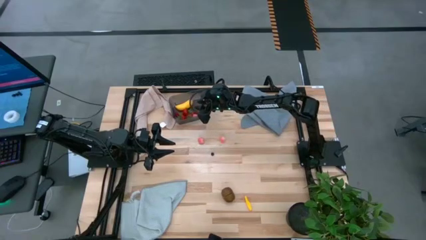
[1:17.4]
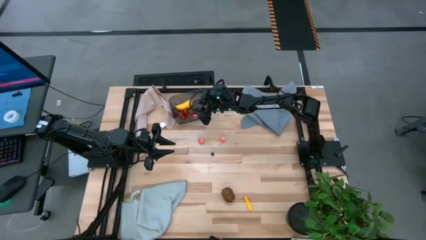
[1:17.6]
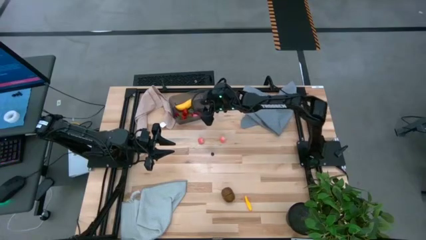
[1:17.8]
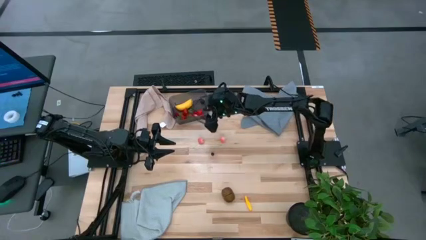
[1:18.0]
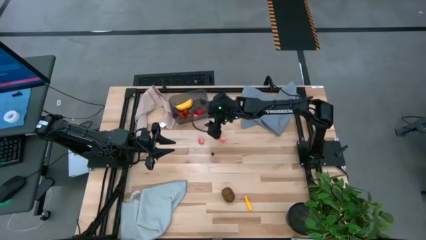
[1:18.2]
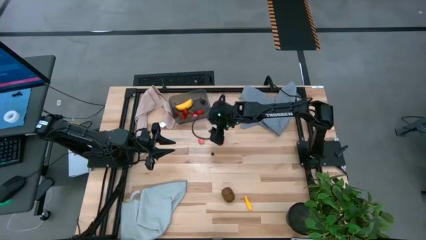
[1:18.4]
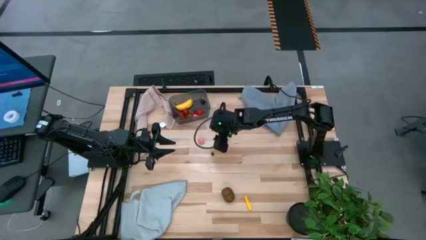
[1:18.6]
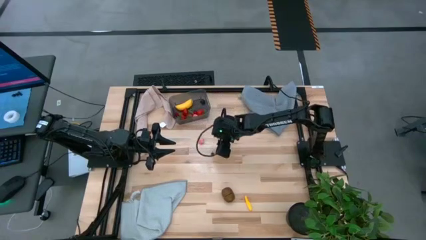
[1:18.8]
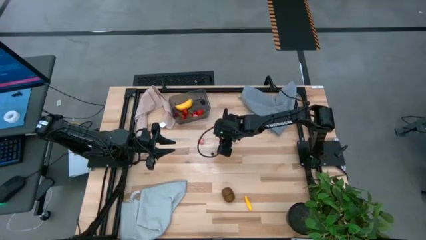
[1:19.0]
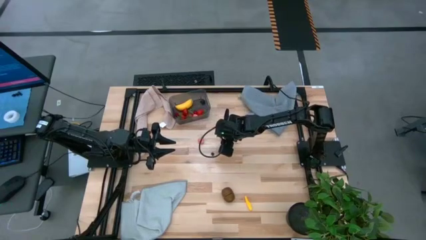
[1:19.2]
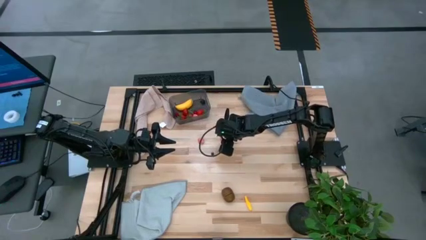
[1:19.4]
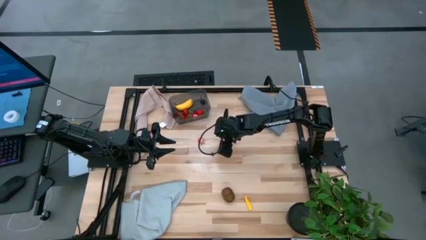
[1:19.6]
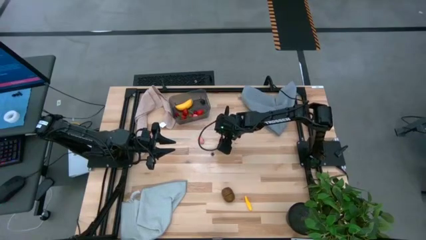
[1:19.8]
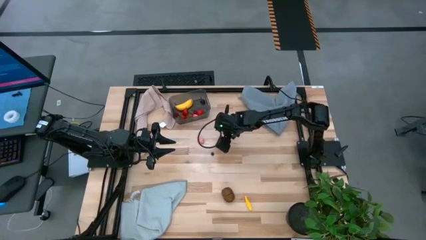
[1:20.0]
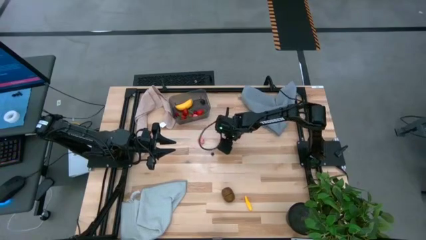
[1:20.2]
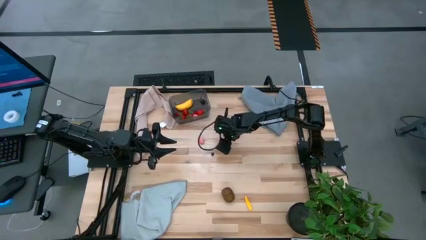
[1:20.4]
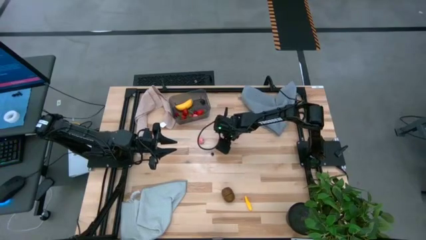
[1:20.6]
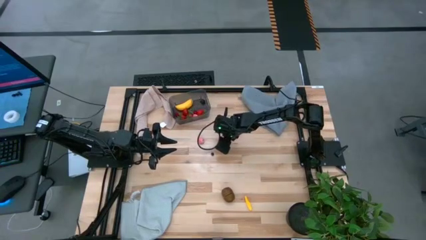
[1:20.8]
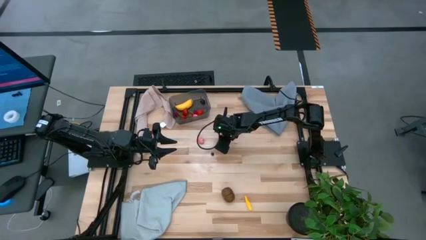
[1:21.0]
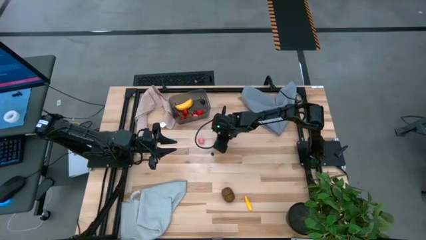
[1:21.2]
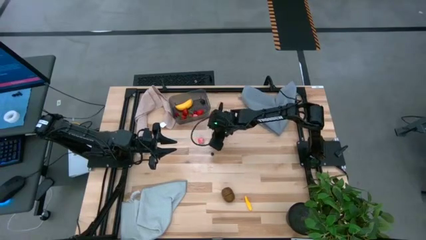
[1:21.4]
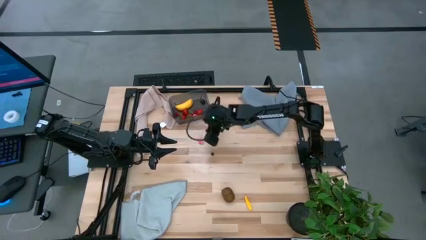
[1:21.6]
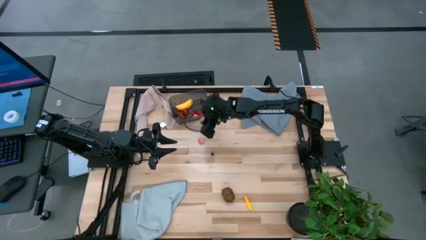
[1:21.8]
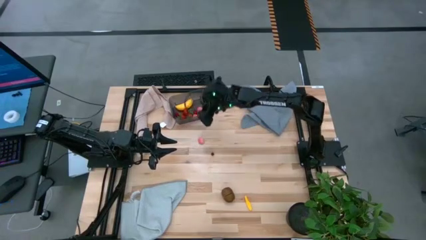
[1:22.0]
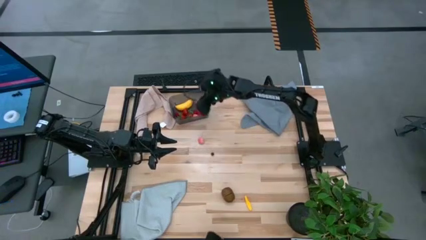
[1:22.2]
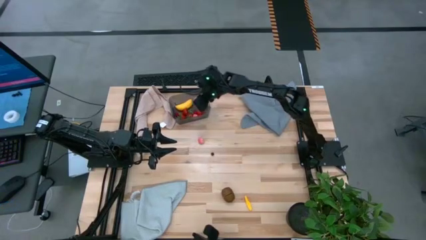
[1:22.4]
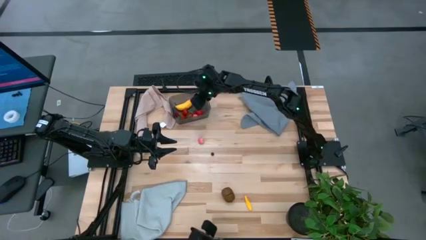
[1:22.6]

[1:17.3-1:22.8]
Task: Pick and placing Produce into tupperware
Put the pink peach into the black bin

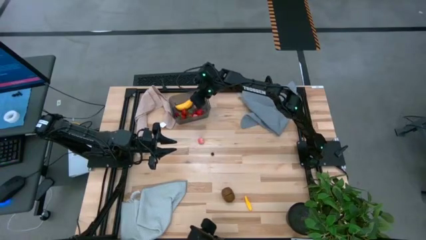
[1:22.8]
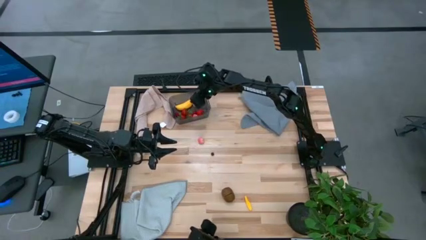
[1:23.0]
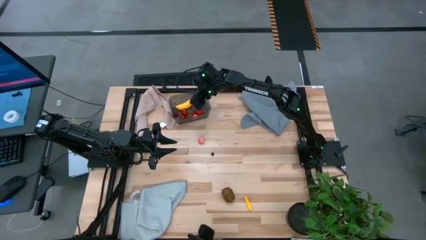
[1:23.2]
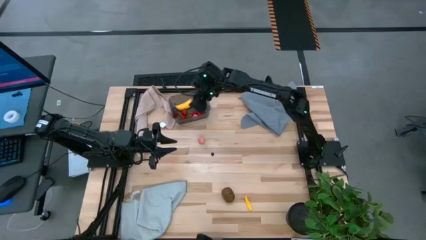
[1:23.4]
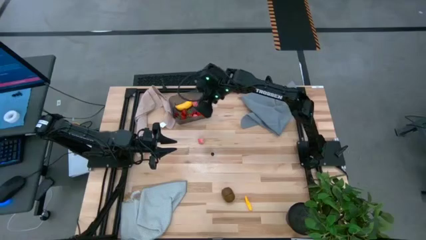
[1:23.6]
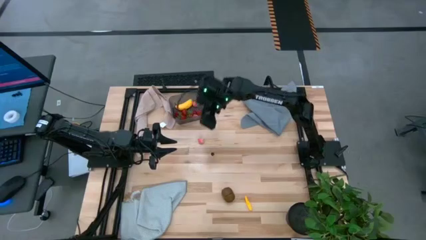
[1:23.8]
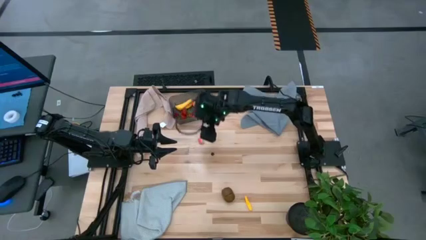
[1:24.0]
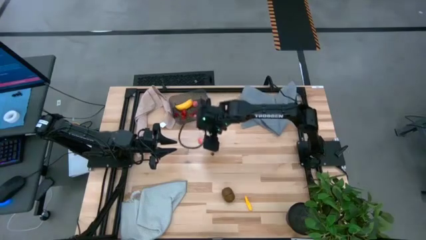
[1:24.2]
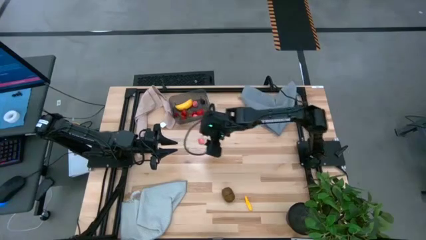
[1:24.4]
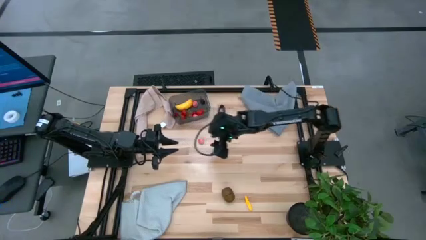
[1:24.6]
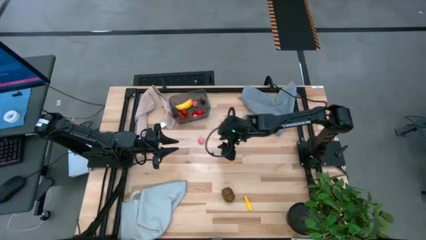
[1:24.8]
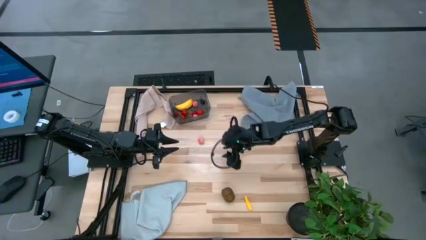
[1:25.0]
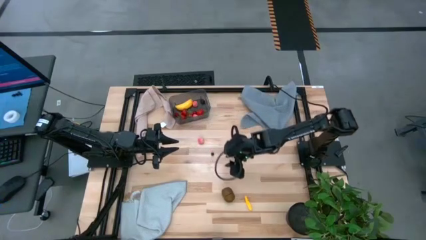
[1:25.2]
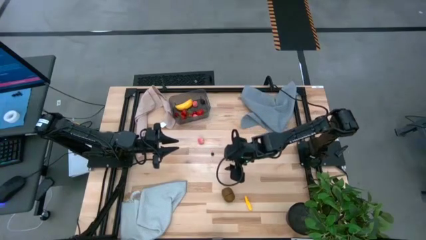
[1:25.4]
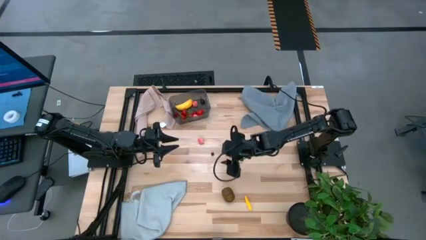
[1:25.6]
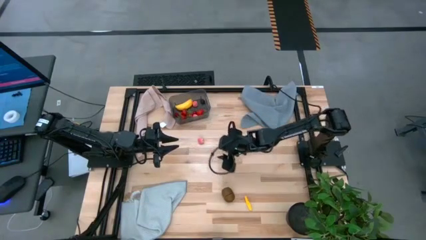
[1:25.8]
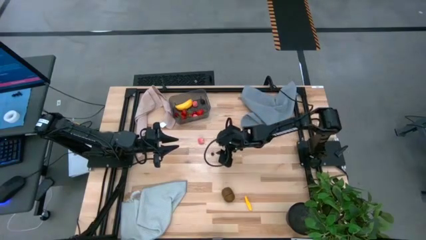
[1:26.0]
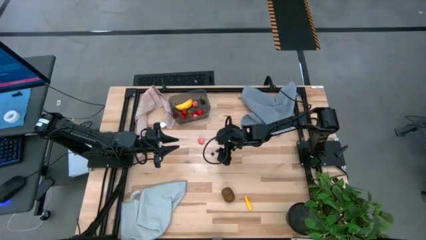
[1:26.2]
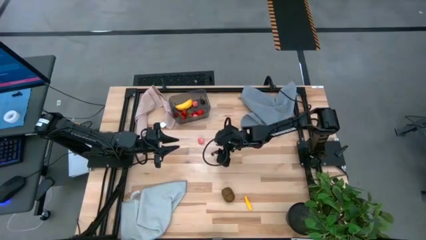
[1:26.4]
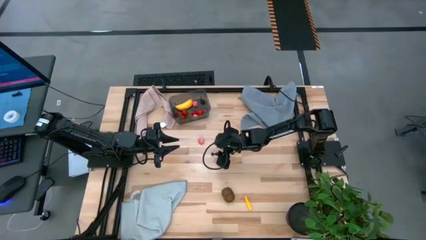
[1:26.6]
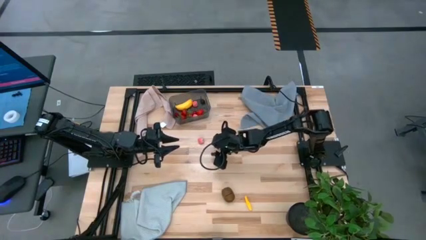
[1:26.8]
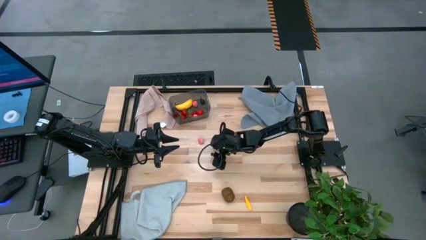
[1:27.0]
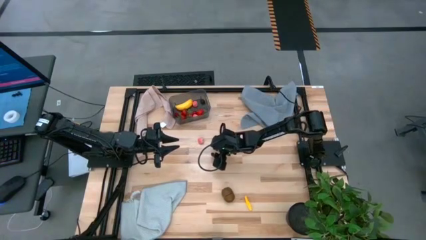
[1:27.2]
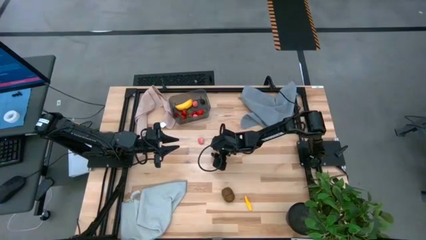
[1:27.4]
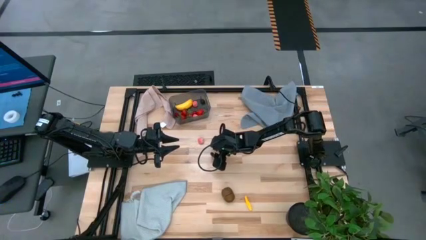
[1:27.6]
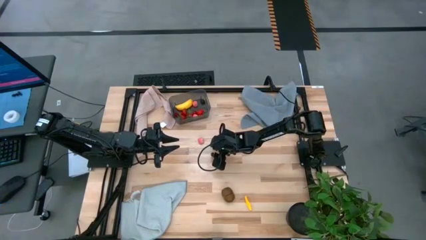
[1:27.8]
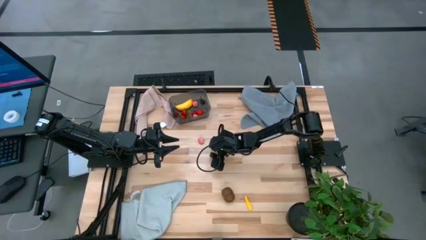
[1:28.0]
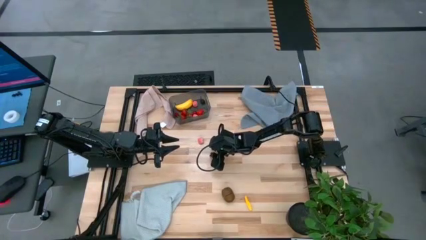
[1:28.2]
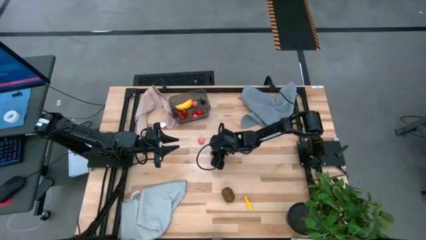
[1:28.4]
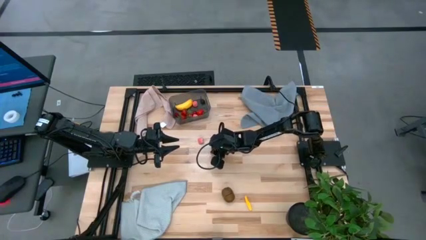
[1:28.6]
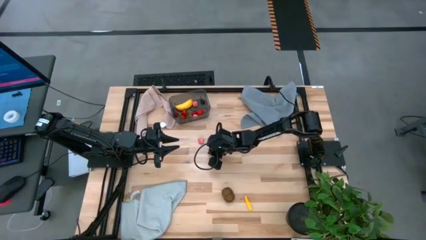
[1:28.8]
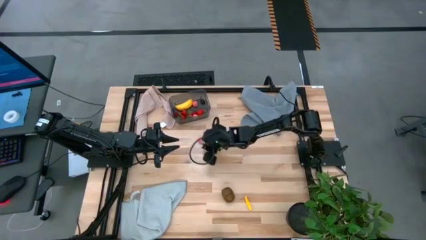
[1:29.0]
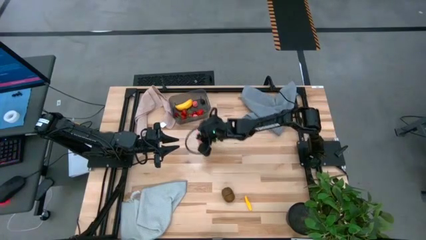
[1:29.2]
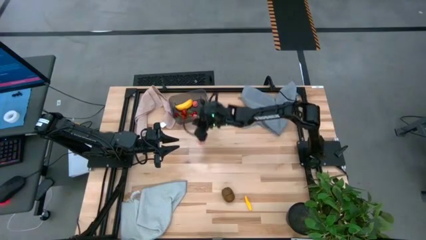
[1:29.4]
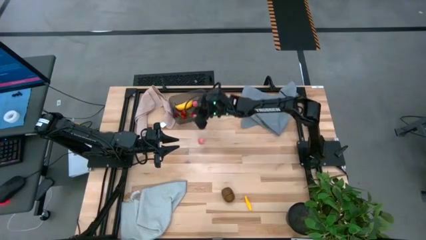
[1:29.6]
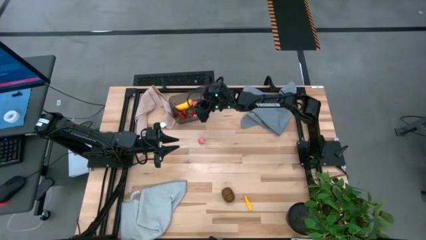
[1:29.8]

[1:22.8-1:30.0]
Put the blueberry into the black bin

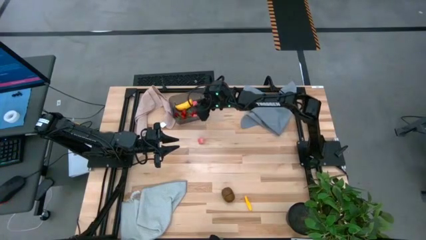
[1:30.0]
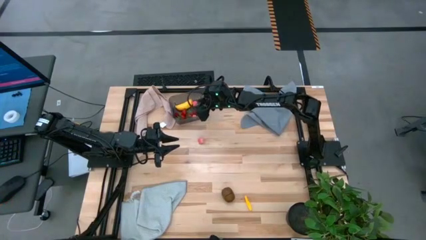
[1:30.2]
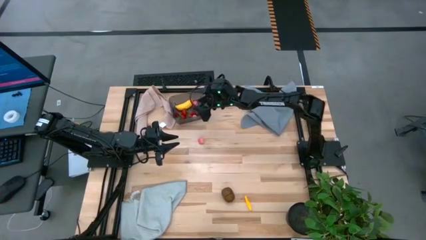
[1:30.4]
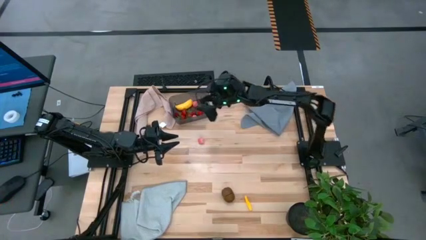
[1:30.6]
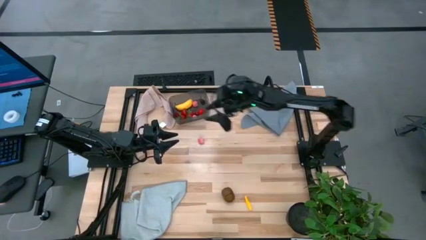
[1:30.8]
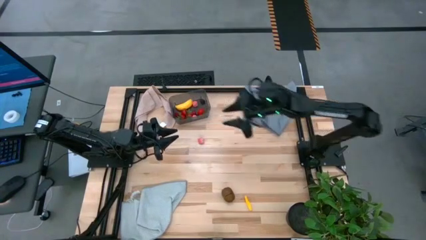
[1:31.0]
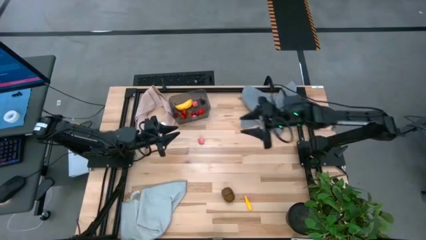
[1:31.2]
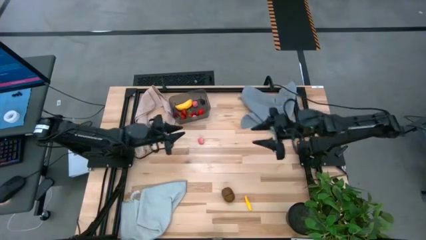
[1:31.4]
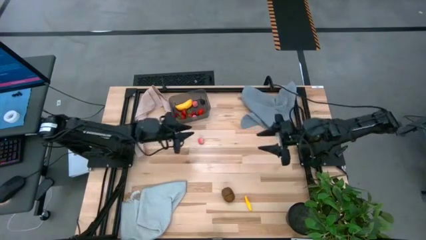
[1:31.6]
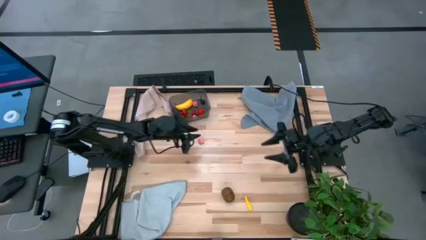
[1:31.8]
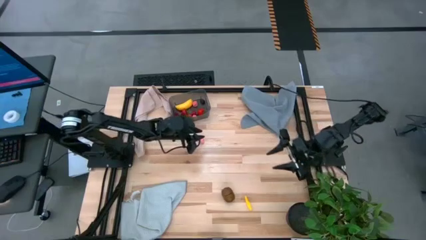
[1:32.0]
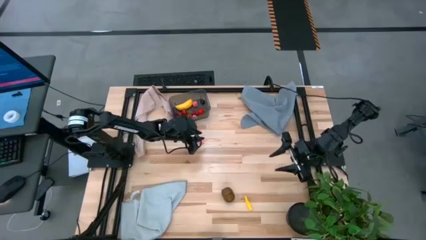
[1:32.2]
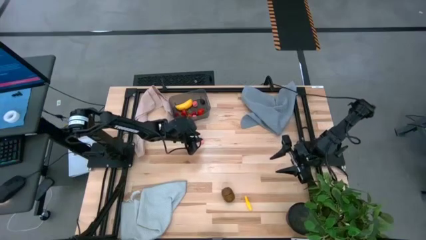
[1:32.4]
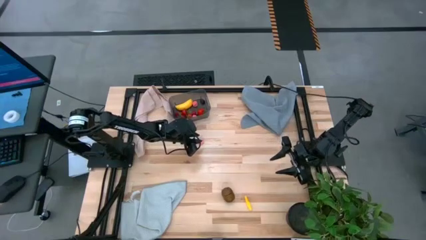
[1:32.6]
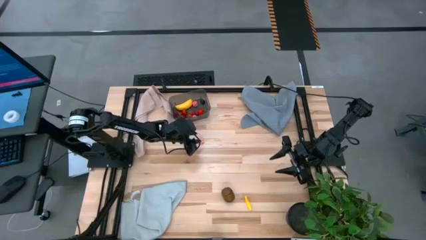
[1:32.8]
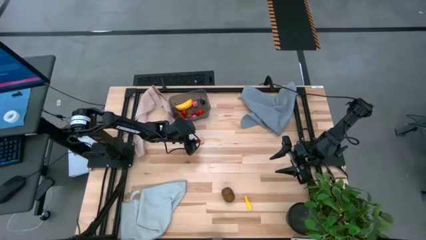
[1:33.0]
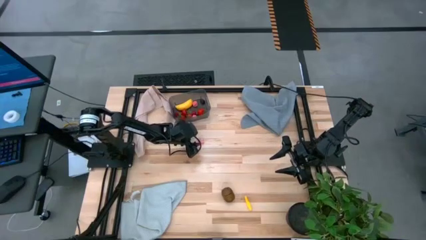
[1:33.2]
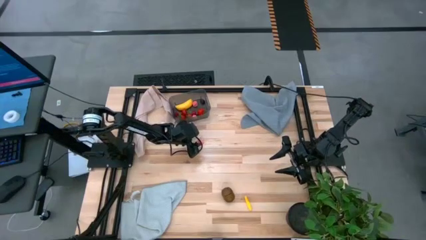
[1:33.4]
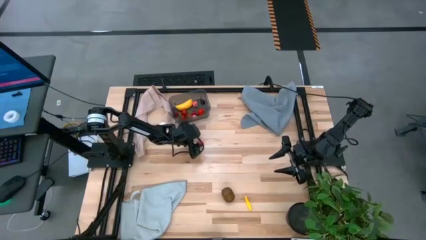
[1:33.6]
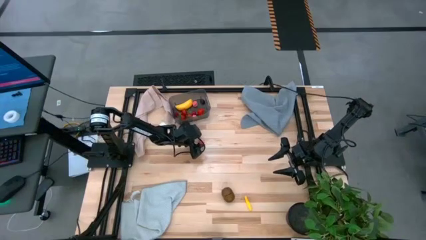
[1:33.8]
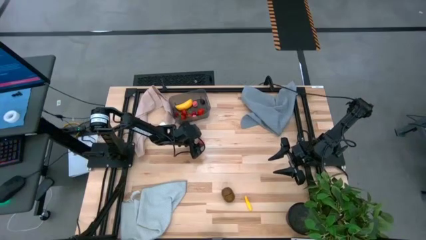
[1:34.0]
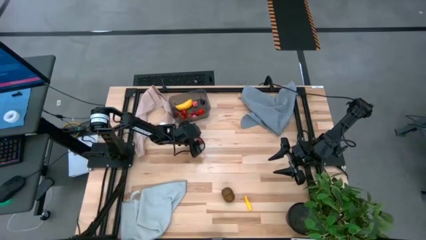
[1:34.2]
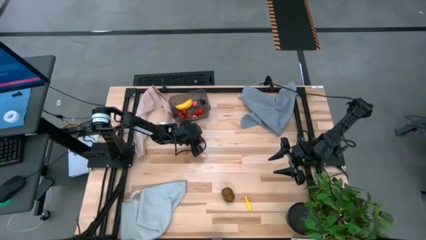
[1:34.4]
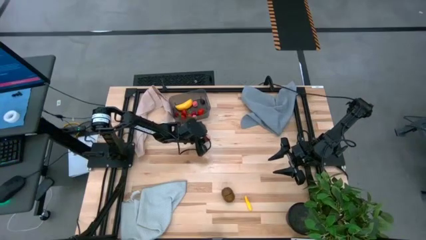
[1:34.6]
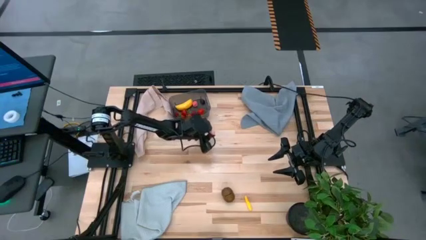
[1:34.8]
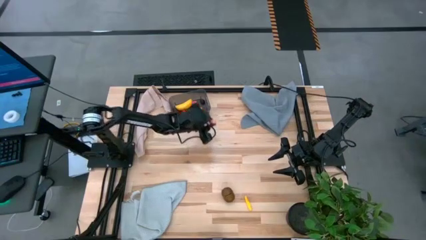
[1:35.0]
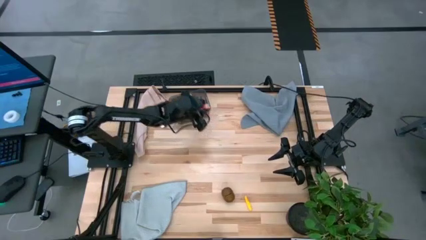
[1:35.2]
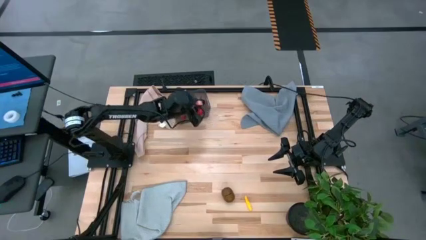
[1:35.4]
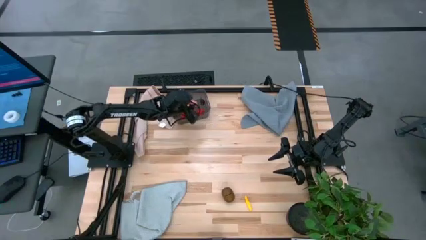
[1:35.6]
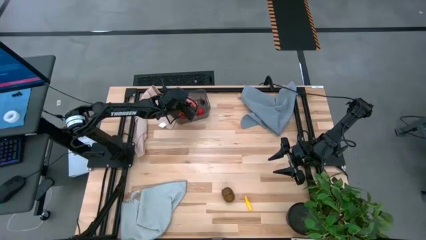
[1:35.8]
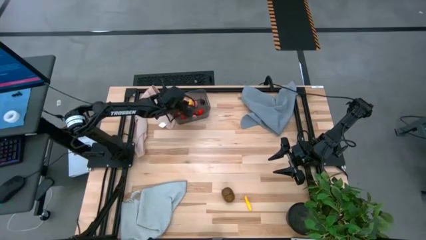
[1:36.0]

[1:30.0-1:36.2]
Put the pink peach into the black bin
